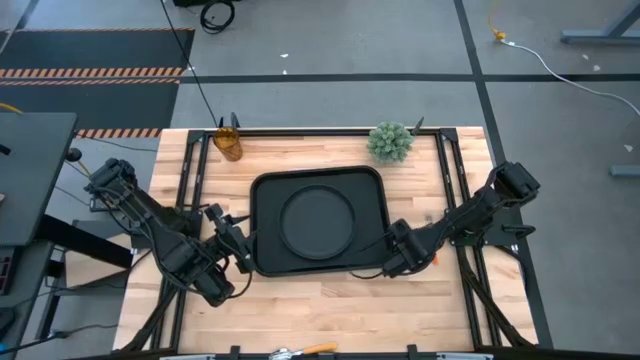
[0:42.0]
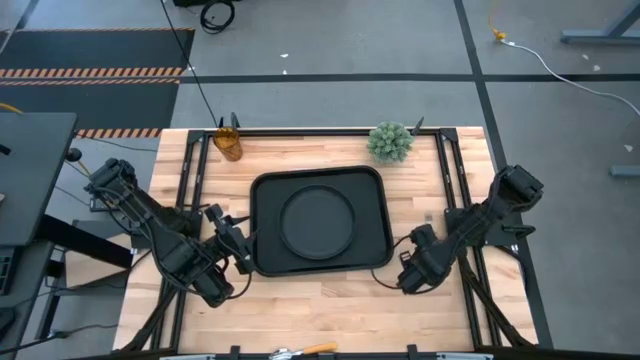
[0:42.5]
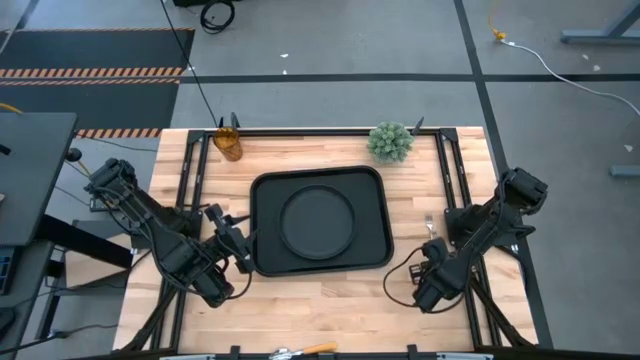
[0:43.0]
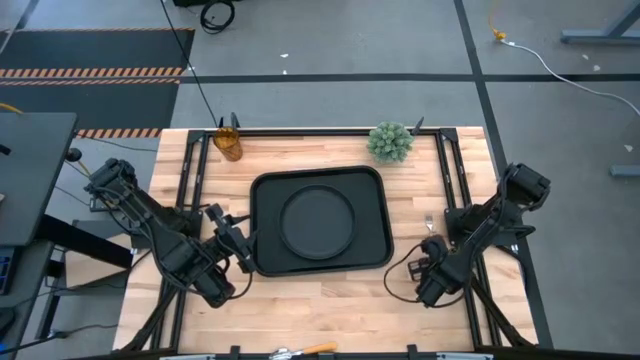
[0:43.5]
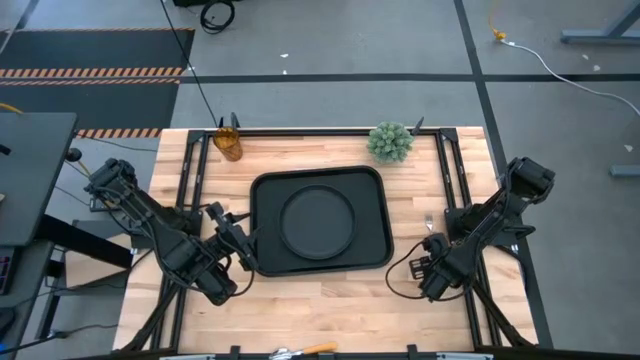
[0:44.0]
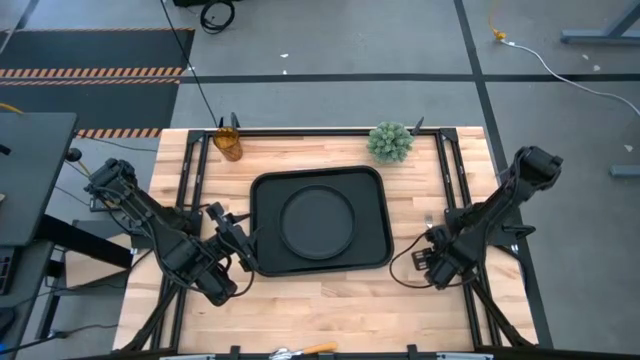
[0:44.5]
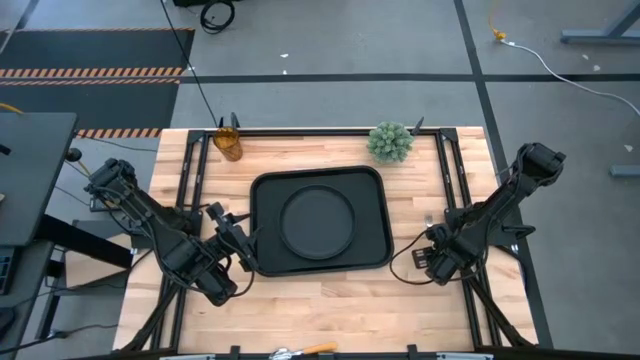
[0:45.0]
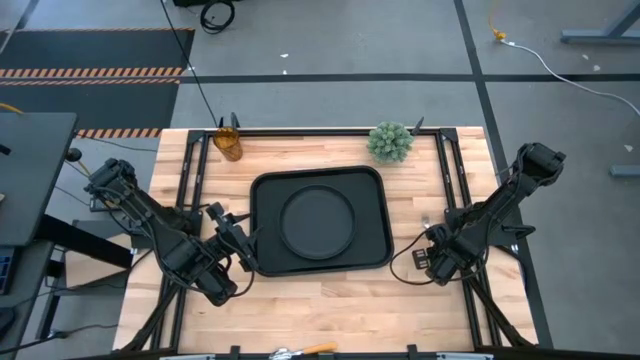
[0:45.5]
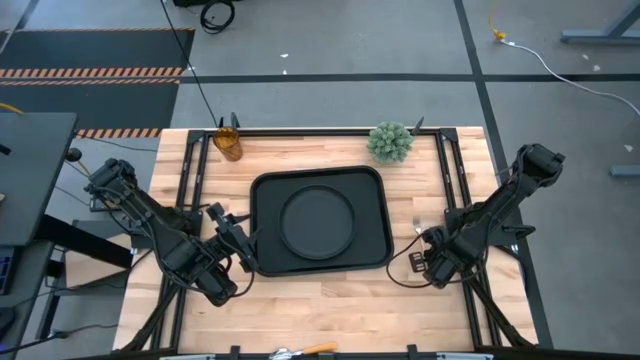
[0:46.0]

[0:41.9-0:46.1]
Task: Pick and place plate/cup/fork/spoon on tray
Put the orange fork on the black serving tray to the right of the black plate

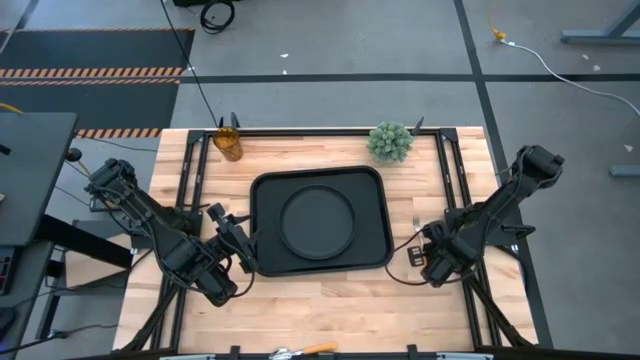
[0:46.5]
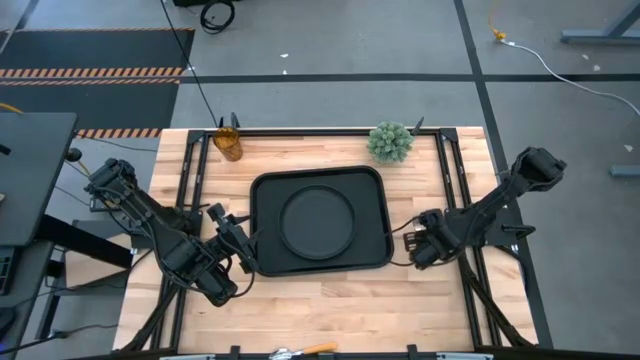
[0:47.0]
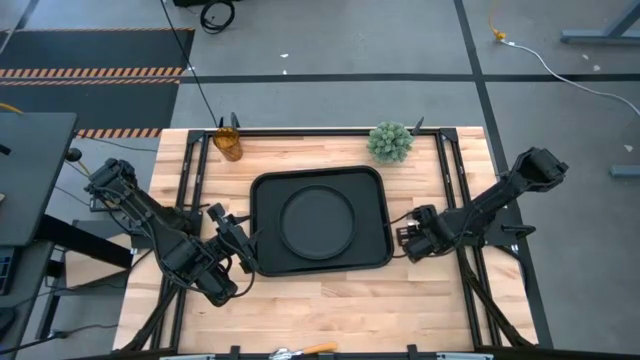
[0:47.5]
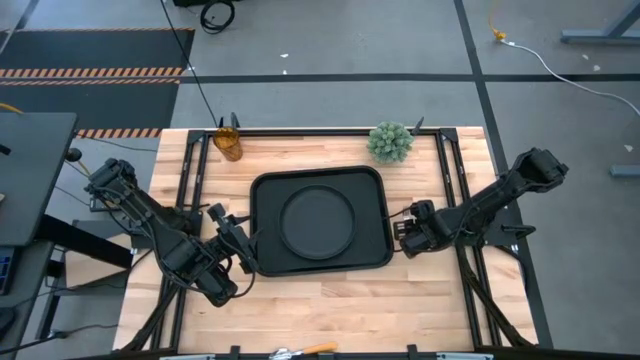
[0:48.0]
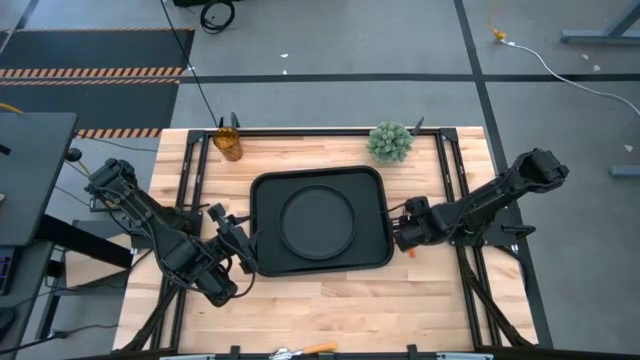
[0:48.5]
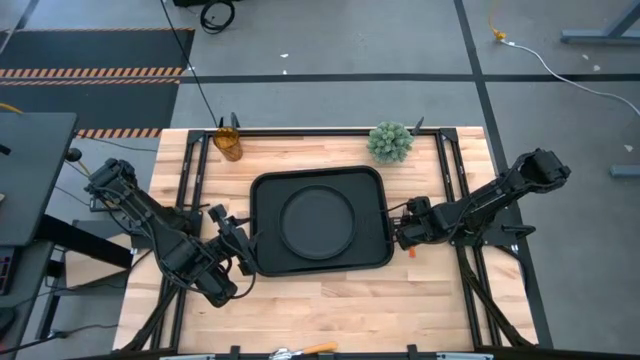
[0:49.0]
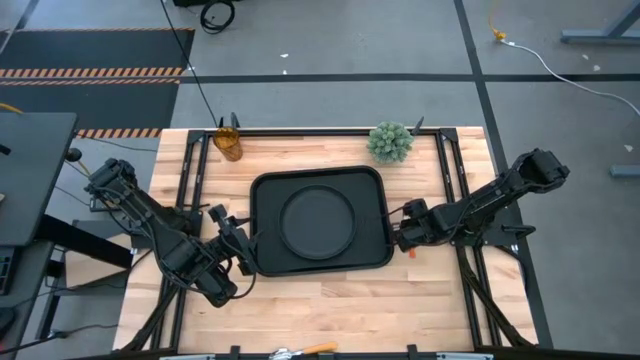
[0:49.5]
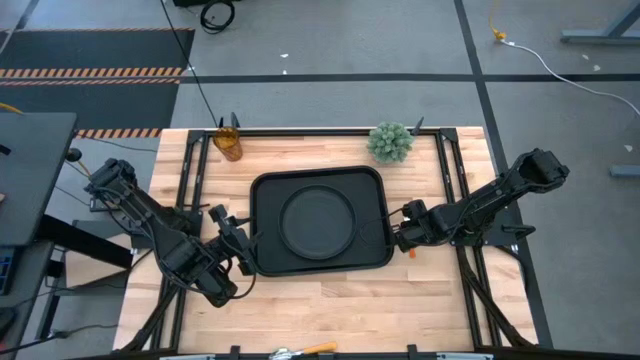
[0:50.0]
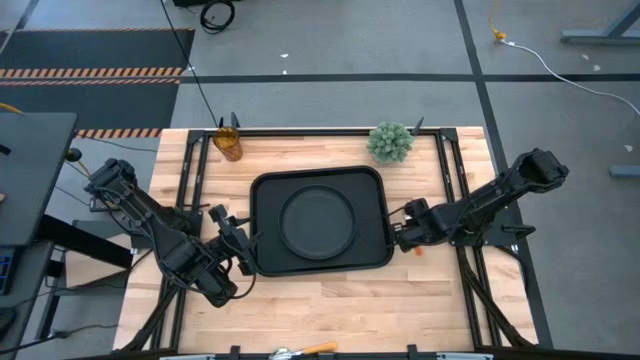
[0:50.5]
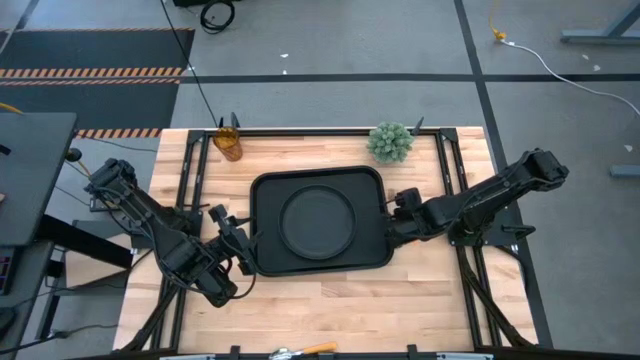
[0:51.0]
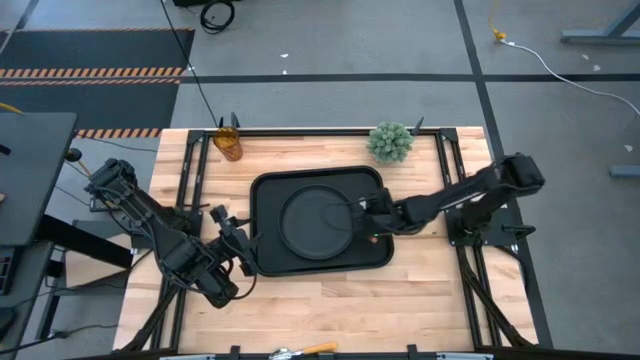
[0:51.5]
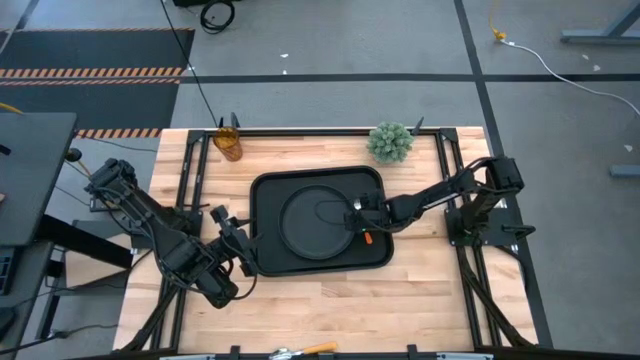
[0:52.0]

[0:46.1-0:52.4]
Put the orange fork on the black serving tray to the right of the black plate

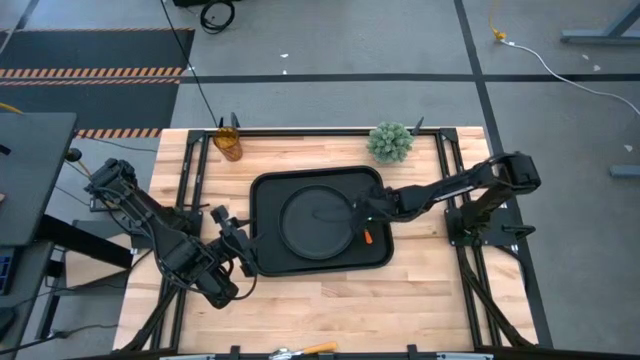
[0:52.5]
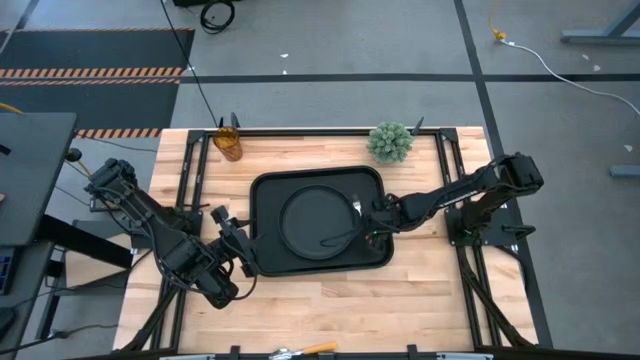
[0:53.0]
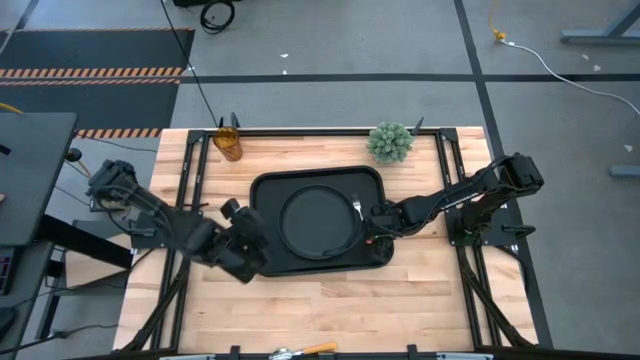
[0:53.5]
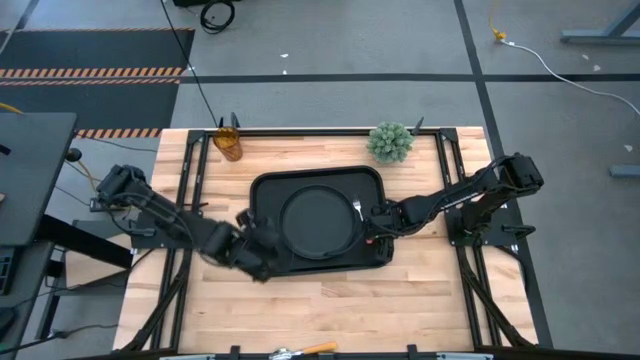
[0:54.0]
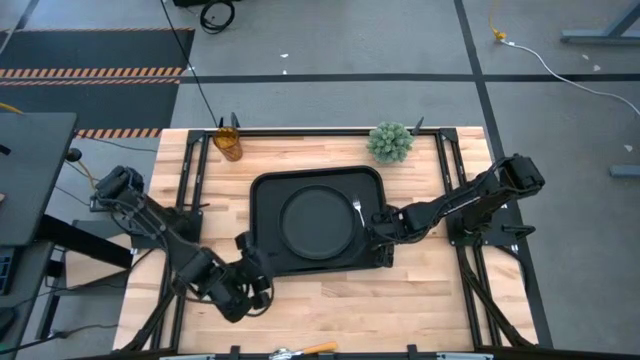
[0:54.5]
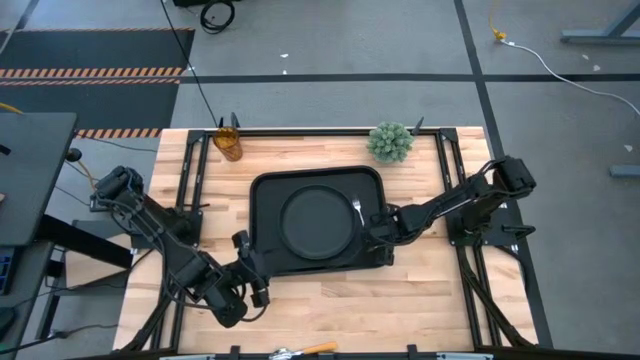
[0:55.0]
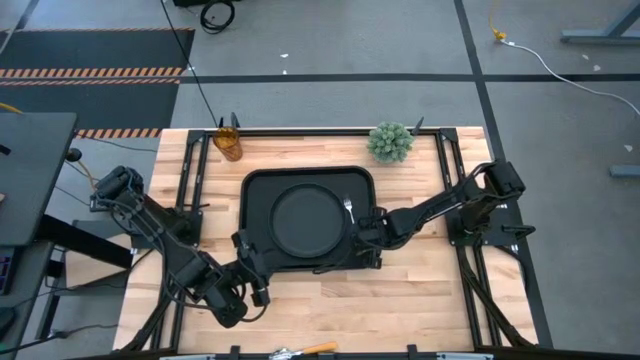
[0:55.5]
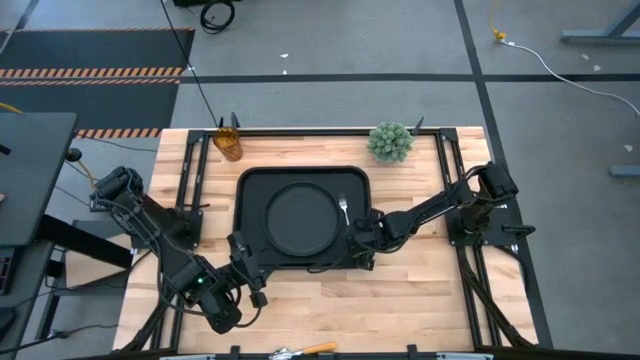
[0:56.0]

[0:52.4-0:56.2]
Adjust the black serving tray on the table

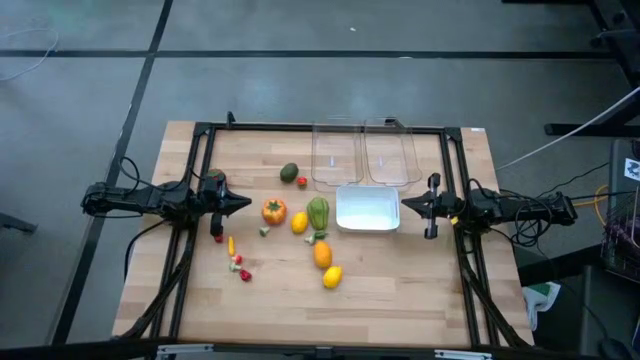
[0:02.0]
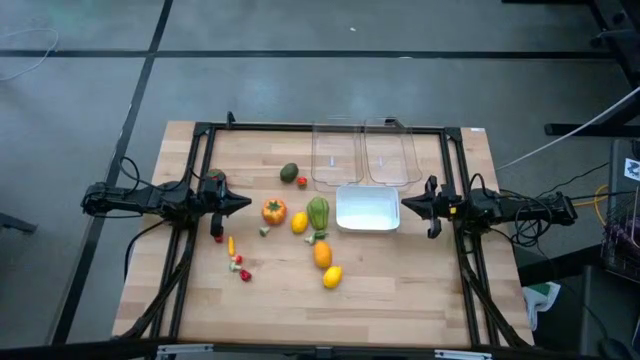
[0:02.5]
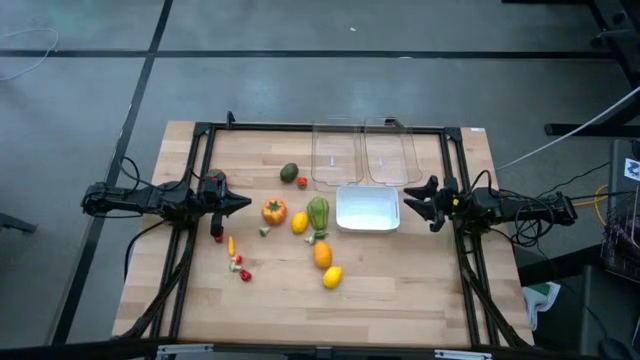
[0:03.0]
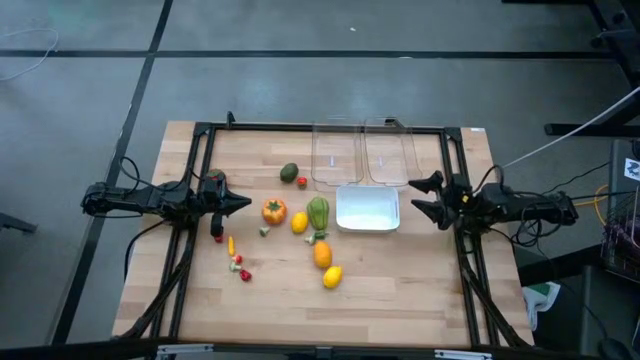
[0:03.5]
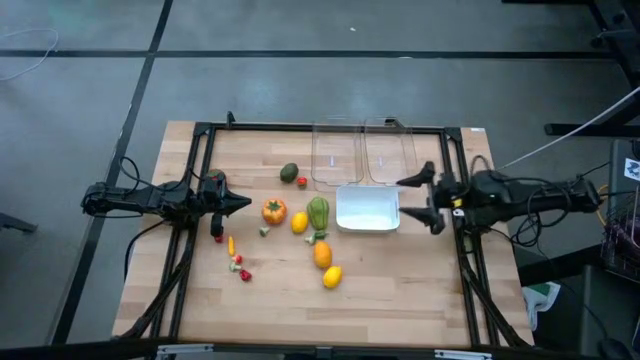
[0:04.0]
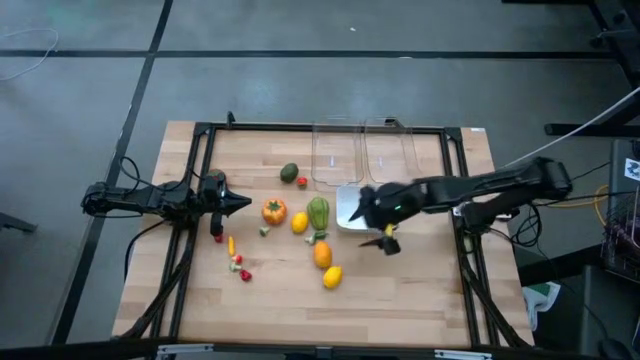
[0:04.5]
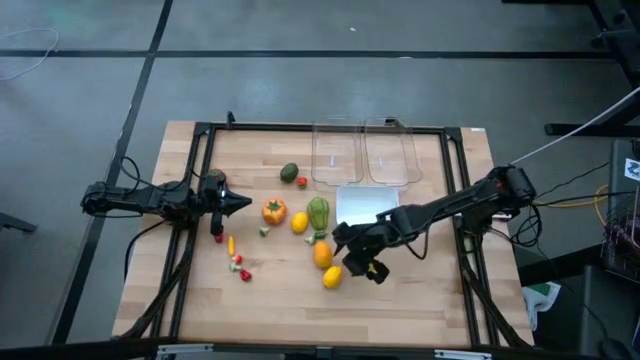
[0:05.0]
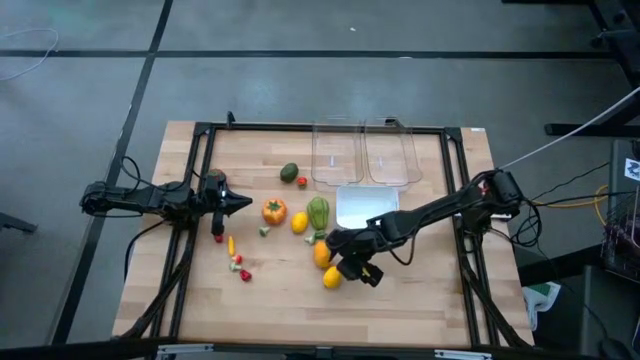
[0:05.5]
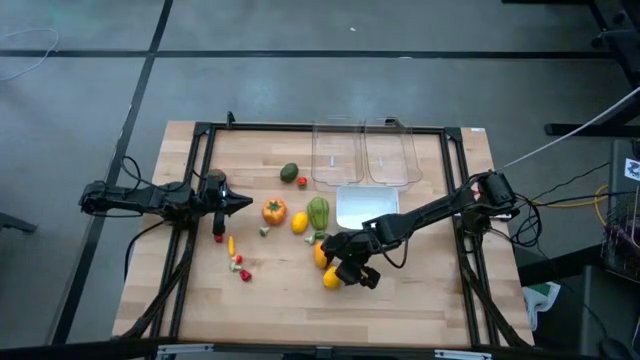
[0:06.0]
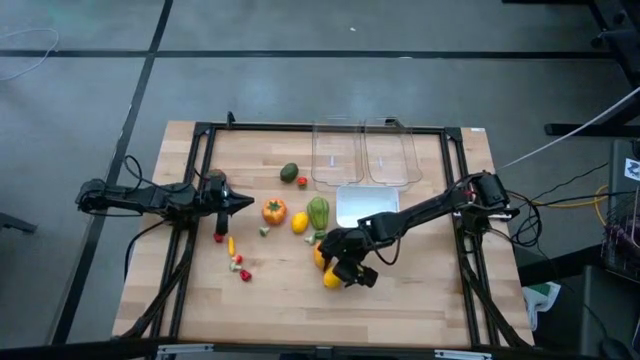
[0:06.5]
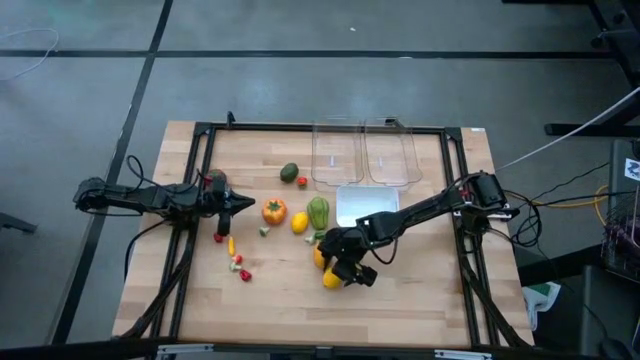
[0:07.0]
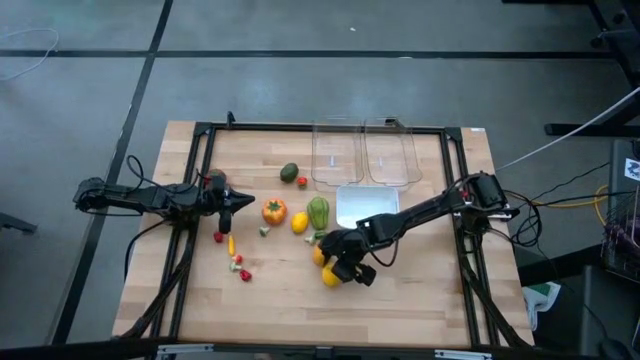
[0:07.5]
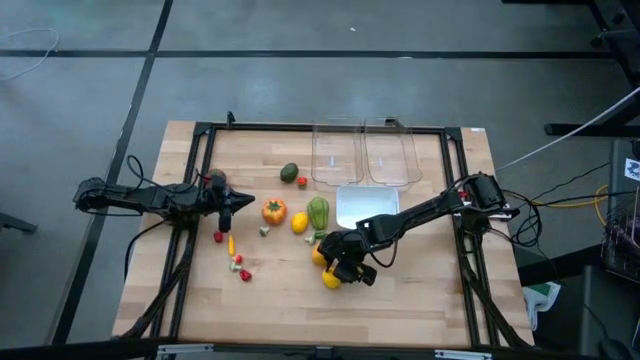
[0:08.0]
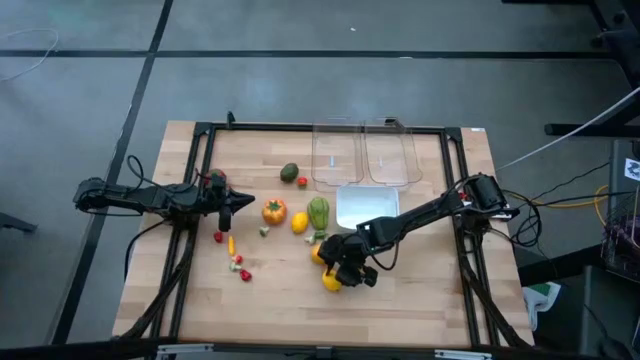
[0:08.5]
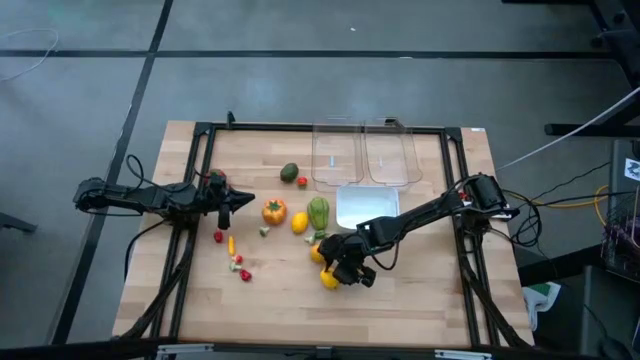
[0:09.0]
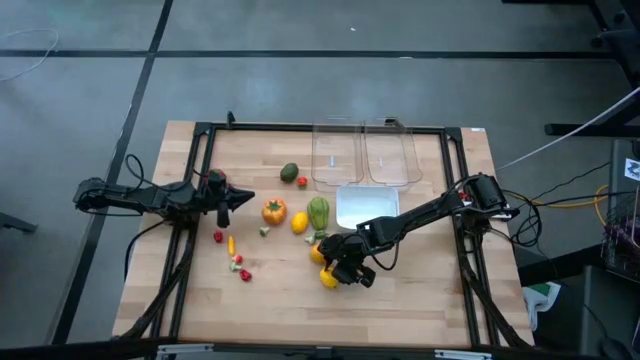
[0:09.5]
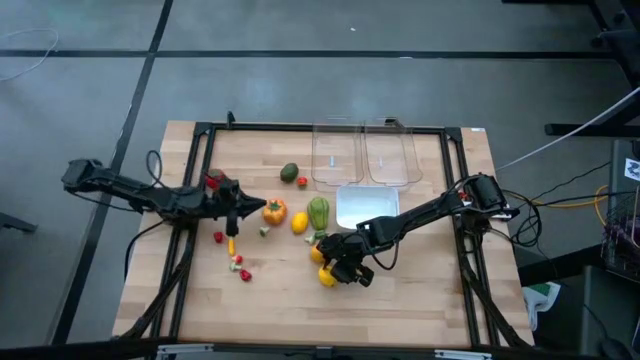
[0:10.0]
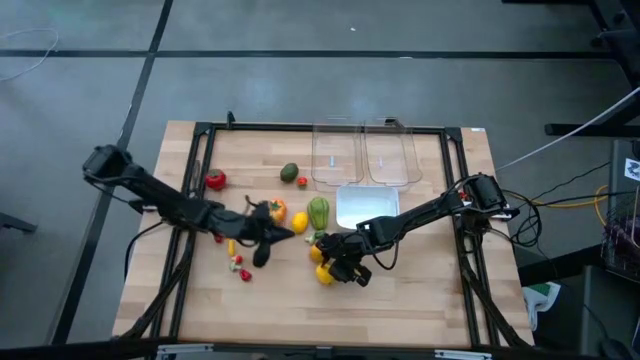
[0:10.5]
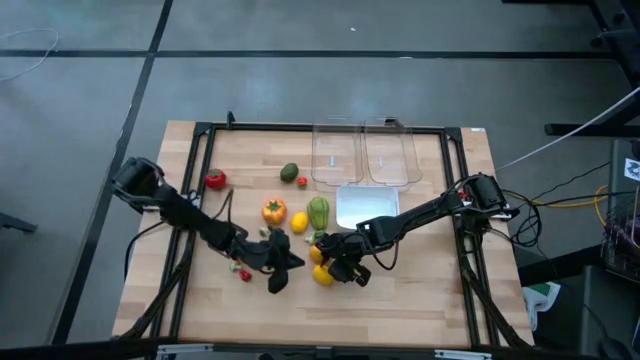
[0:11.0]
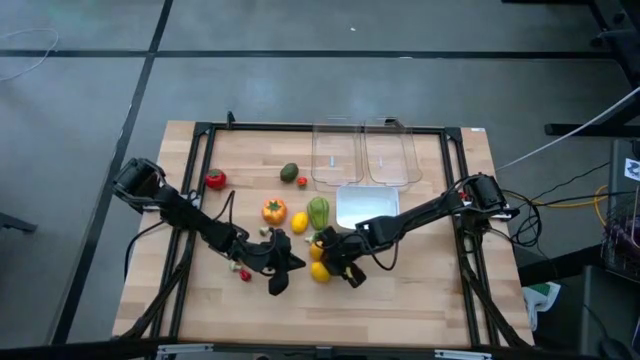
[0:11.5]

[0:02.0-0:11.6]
Task: Sort produce into baskets
Put the bottom lemon into the white bin
